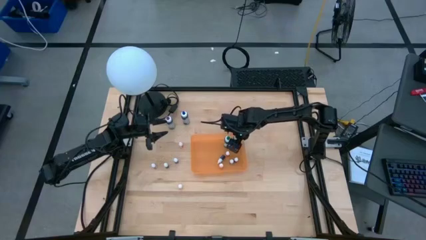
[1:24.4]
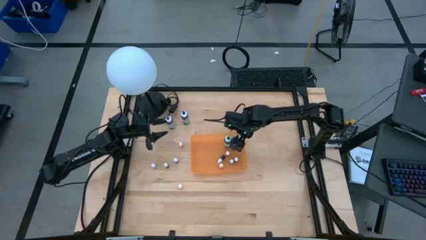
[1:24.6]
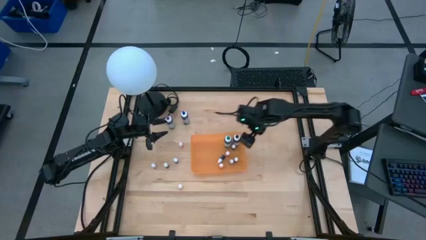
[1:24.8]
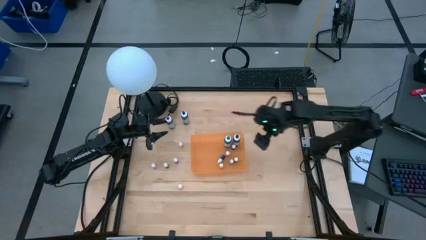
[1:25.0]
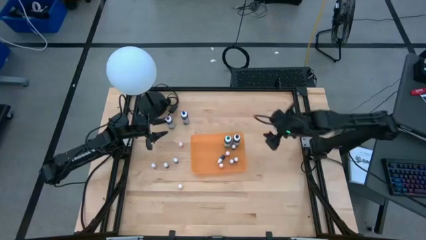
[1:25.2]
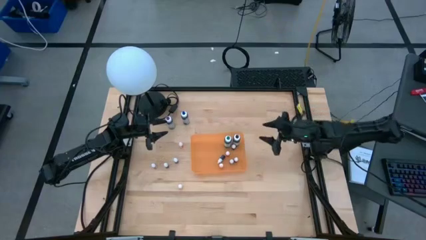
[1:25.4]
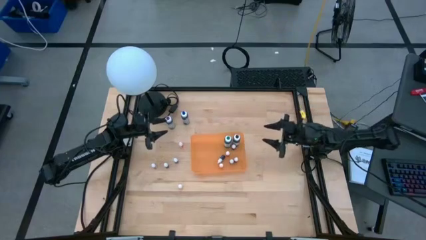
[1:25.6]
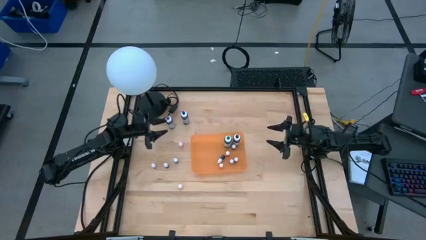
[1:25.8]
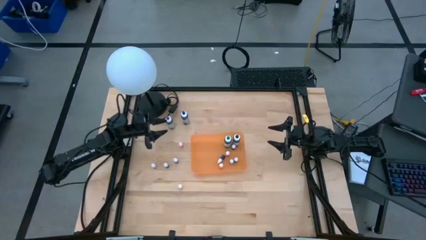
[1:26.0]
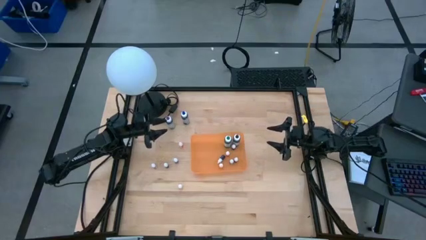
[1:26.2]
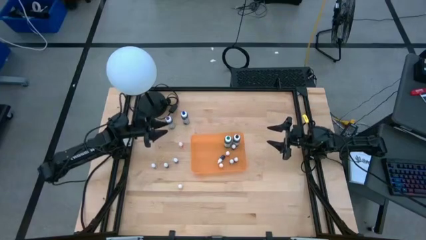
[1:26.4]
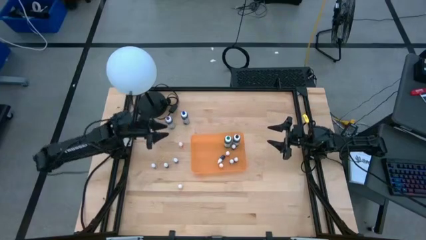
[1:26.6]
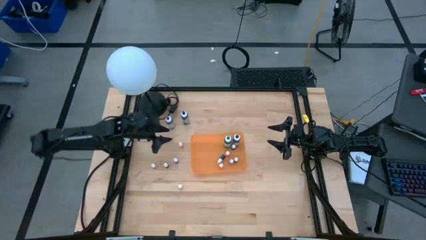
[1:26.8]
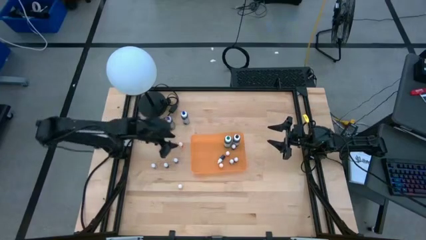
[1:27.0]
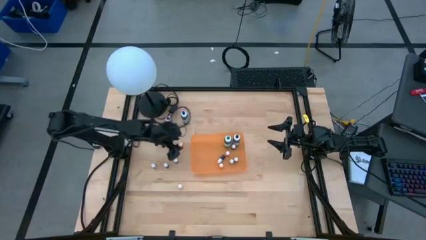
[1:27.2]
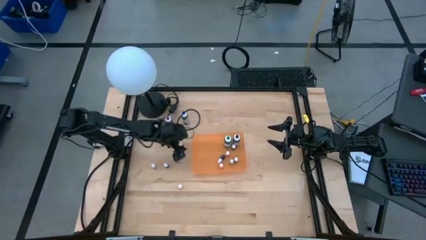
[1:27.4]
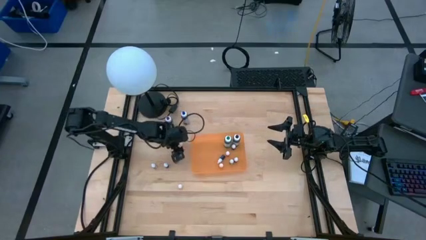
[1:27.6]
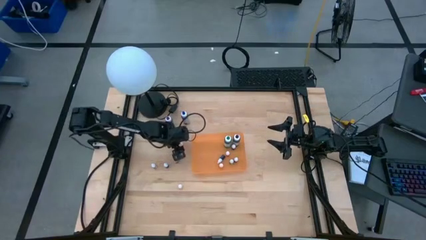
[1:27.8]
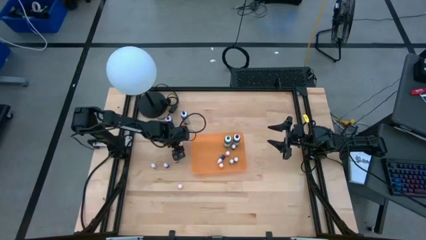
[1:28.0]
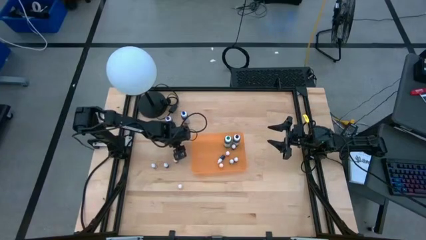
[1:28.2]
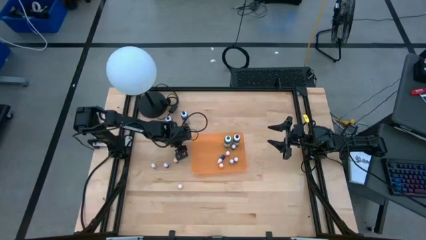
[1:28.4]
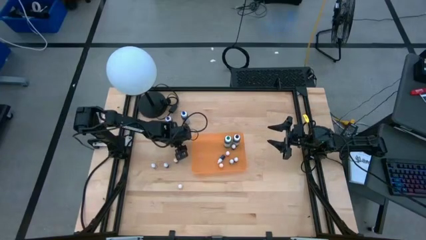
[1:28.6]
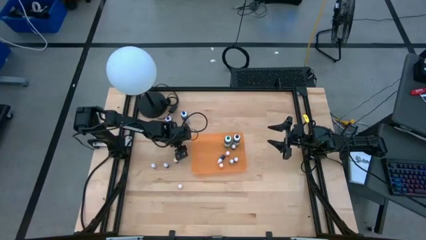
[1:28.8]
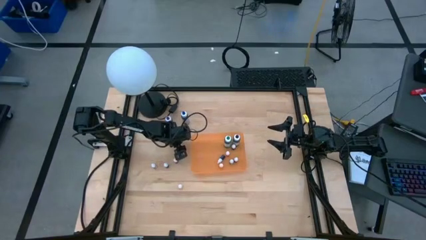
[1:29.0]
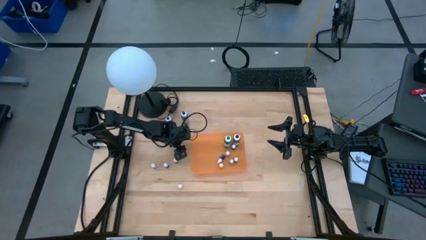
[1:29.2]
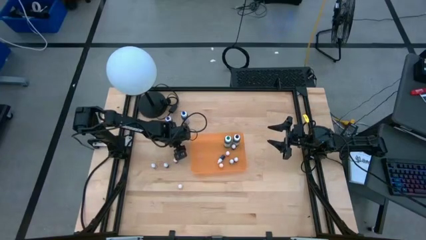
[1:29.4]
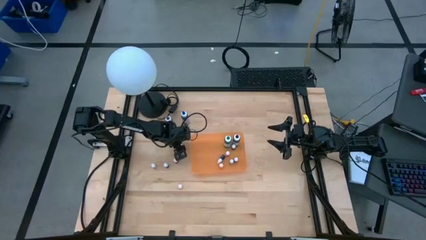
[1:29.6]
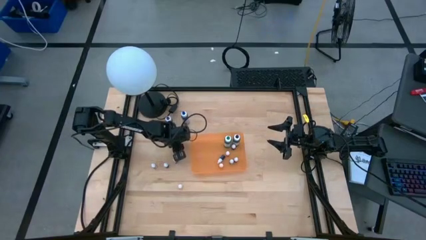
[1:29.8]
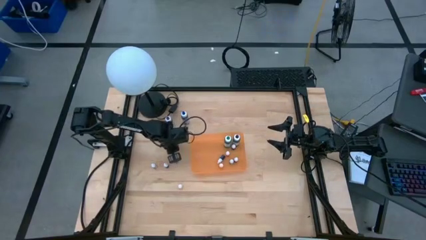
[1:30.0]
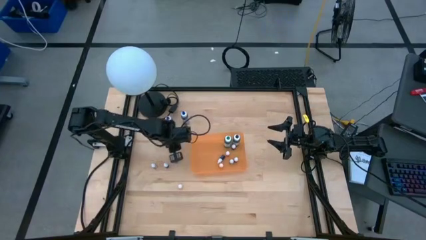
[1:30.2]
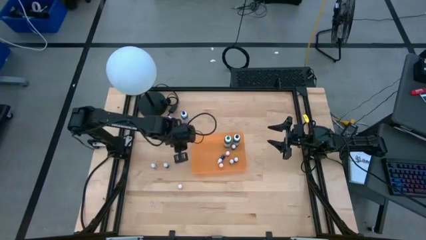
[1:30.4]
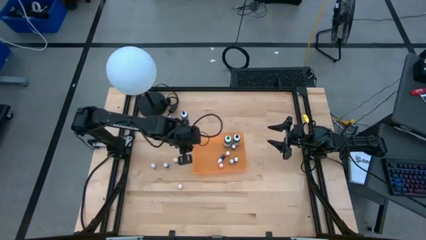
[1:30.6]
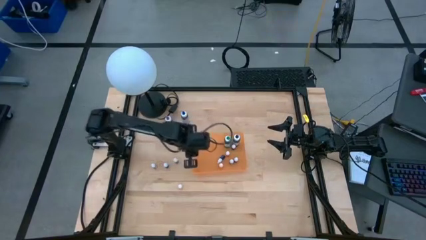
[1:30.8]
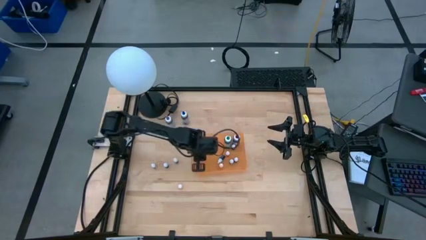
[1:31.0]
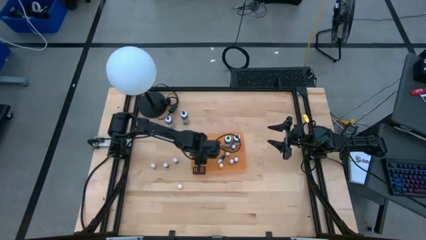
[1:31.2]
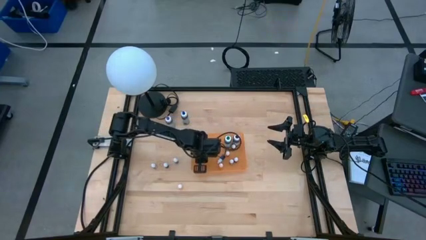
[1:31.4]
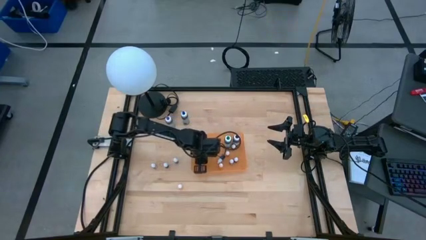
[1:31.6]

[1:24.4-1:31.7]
Task: Pick & Place food coloring
Put the small orange food coloring bottle into the orange bin

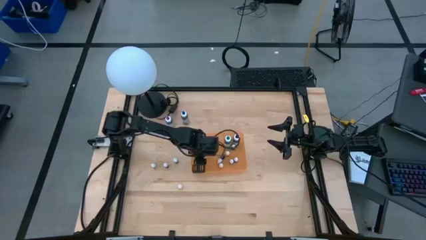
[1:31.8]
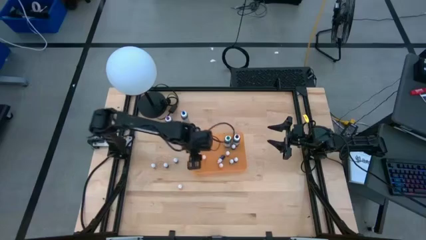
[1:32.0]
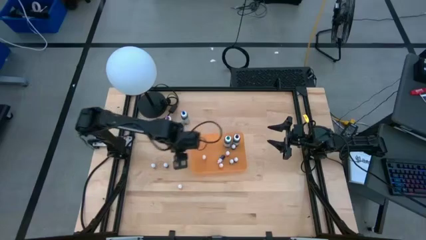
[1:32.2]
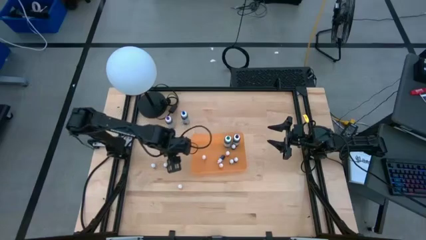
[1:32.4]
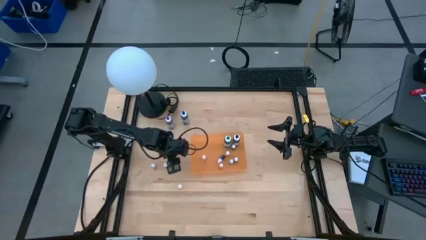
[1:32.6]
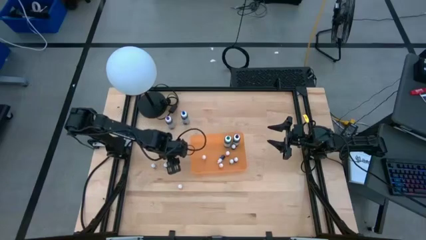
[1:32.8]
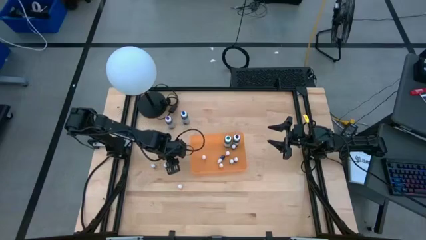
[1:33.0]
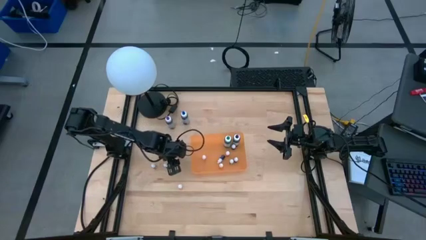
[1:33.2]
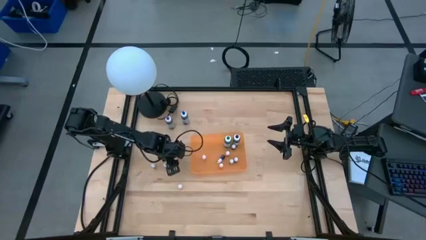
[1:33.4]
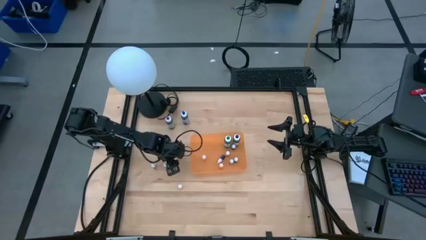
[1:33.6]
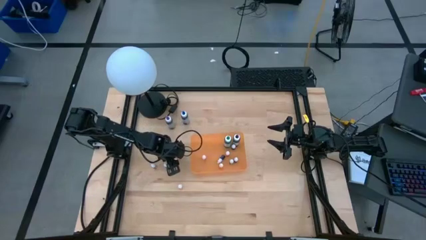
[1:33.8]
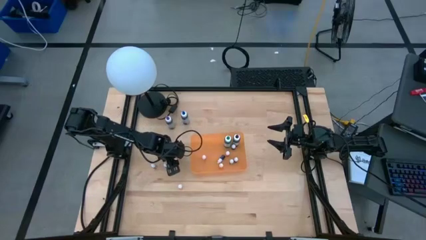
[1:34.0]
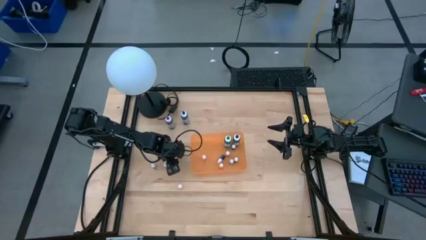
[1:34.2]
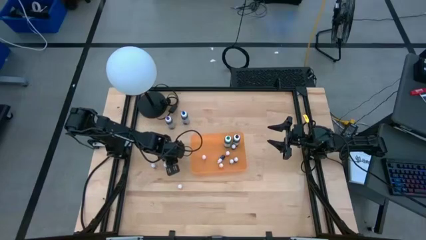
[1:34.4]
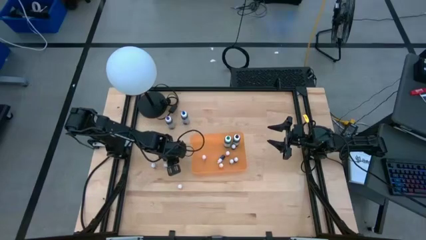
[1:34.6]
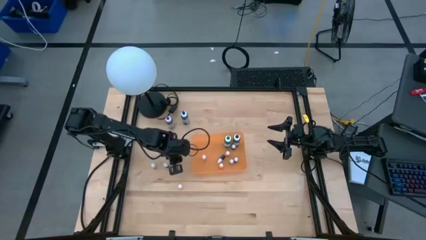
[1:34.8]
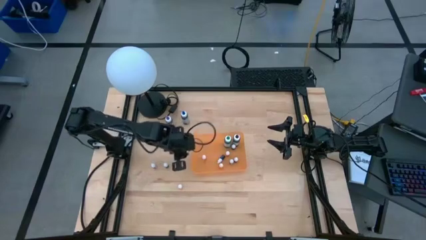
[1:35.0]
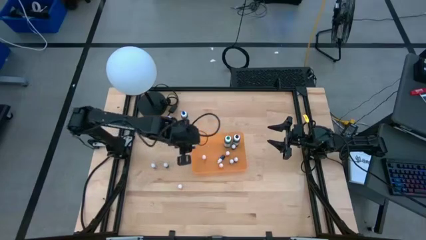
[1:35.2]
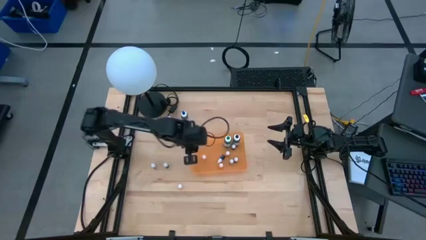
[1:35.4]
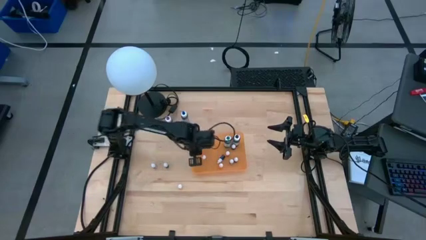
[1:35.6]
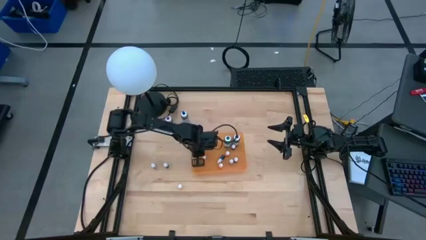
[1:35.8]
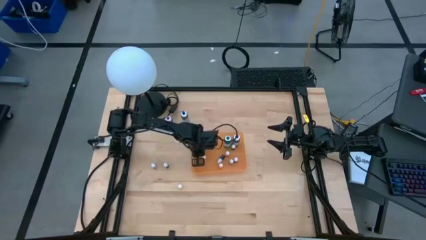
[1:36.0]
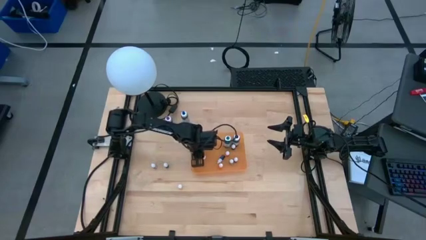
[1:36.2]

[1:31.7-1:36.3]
Put the small purple food coloring bottle into the orange bin

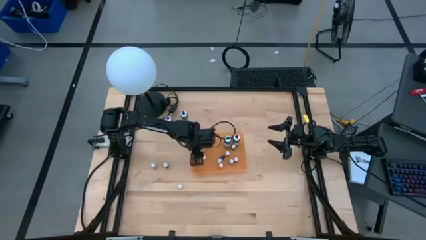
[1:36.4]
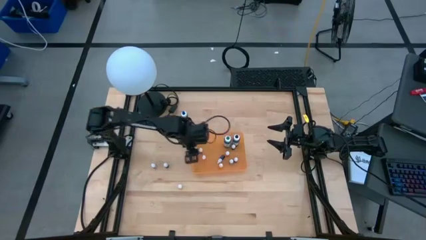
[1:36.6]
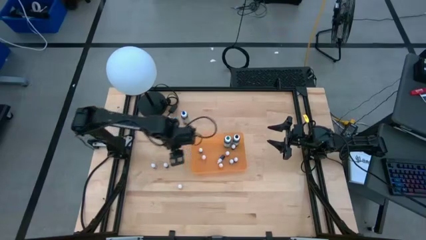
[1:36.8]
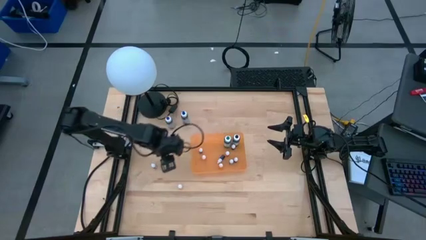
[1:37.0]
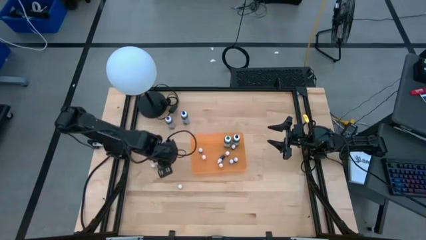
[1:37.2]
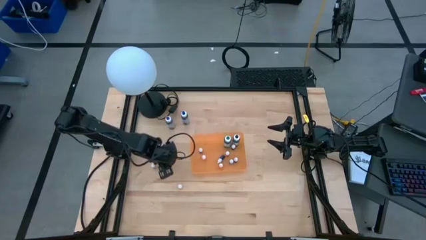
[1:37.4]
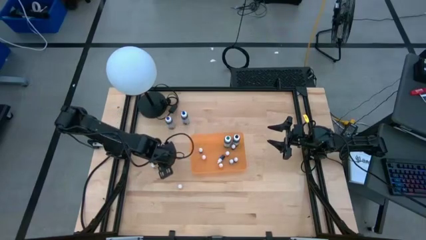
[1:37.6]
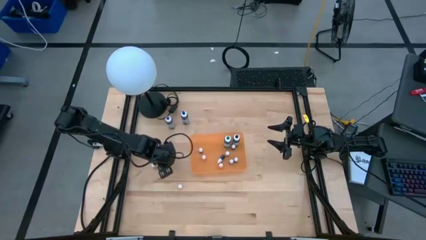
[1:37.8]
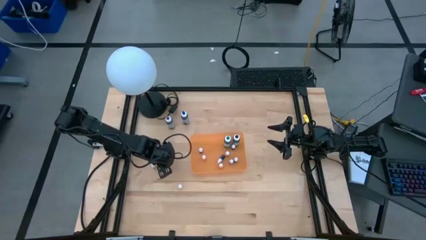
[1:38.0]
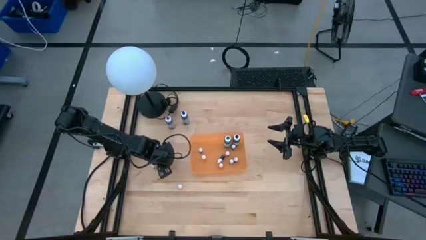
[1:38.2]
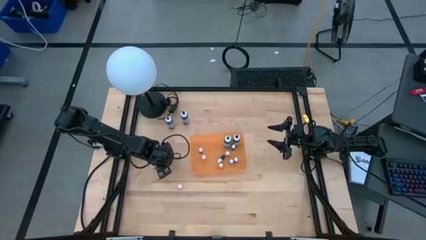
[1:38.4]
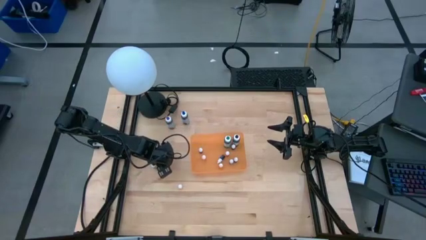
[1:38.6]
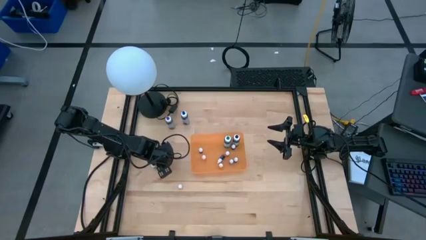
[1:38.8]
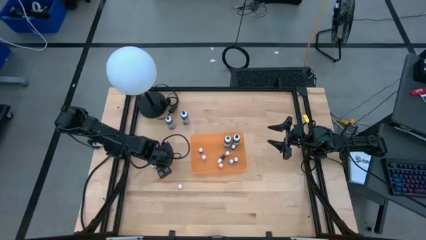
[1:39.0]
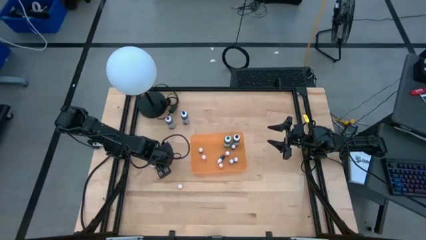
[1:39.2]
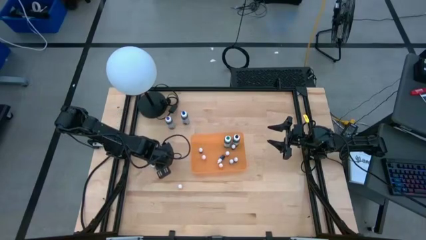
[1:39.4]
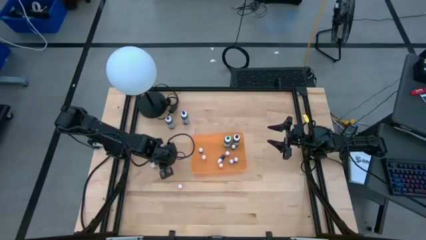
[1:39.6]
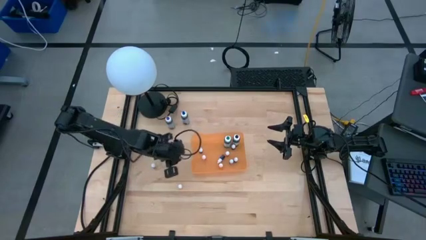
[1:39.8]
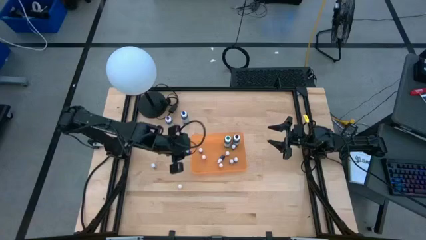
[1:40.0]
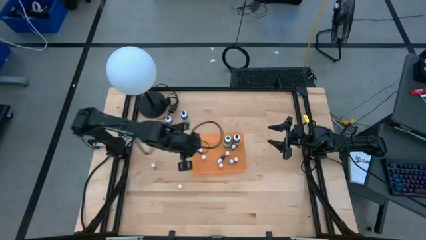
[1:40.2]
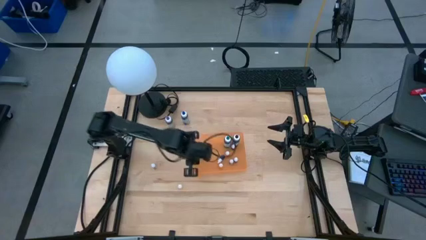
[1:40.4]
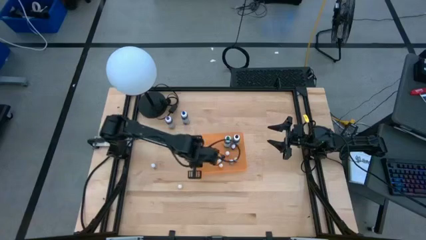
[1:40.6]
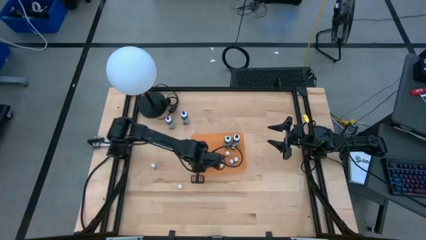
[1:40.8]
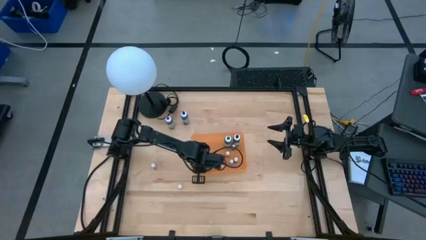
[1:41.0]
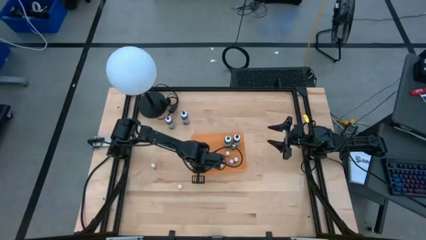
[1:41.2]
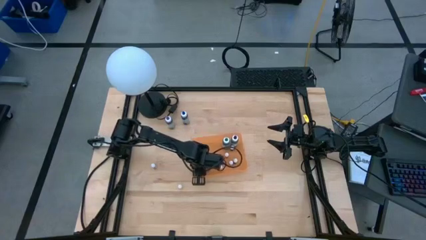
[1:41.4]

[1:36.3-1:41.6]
Put the small blue food coloring bottle into the orange bin

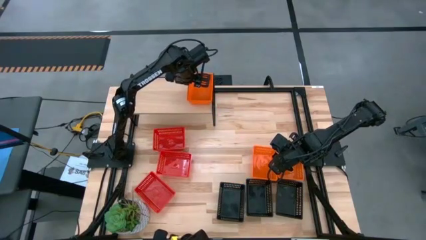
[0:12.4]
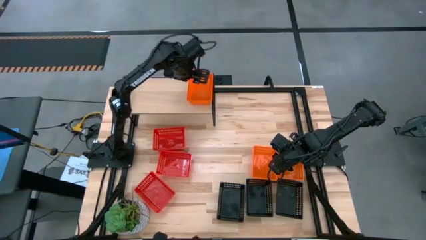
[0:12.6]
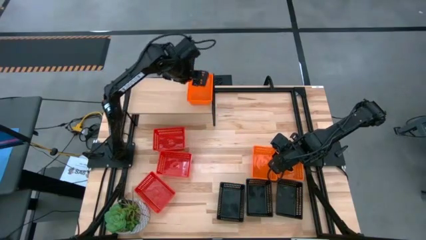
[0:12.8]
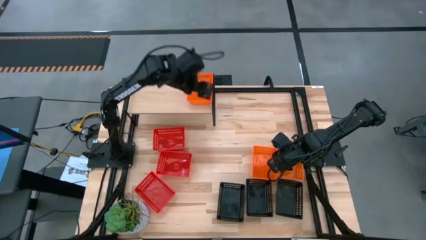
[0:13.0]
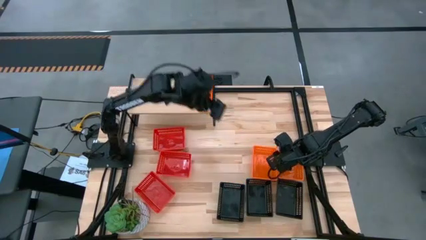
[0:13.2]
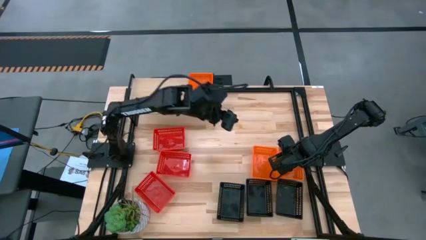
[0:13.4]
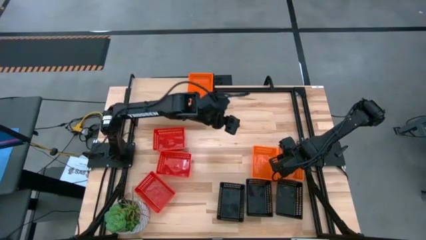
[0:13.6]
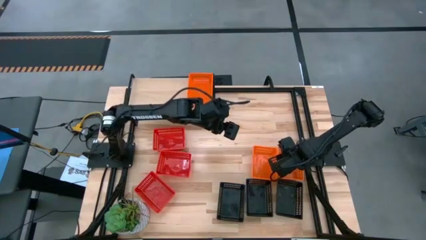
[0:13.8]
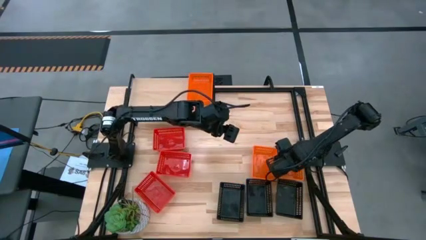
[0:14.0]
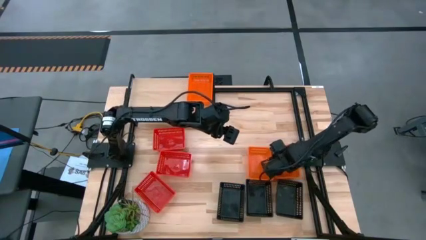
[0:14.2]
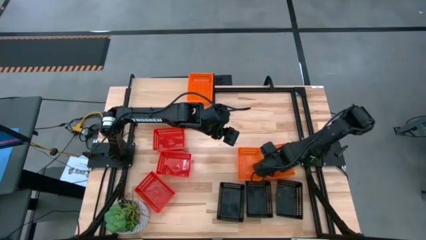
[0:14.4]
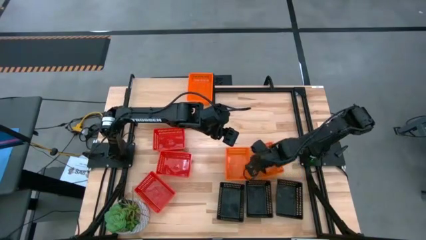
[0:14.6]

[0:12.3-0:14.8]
Task: Stack baskets on shelf by color
Move the orange bins to the center of the table
